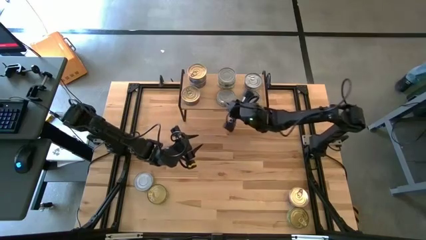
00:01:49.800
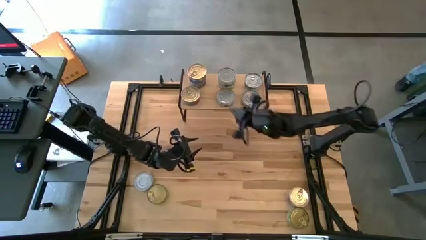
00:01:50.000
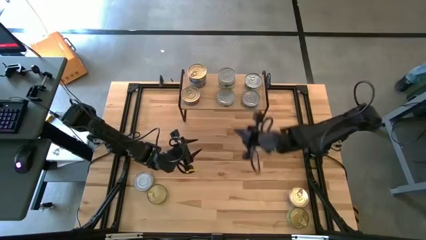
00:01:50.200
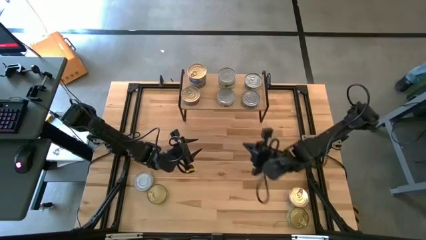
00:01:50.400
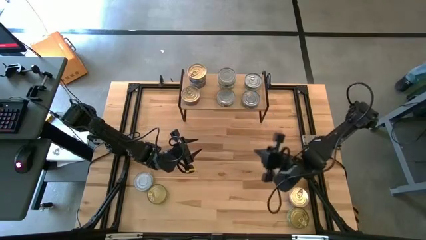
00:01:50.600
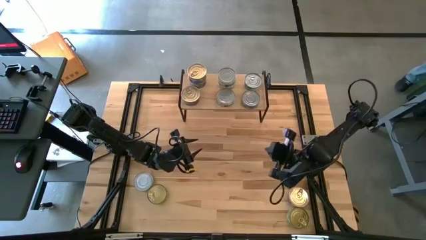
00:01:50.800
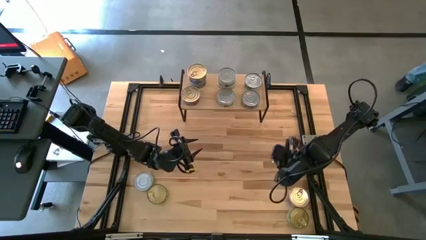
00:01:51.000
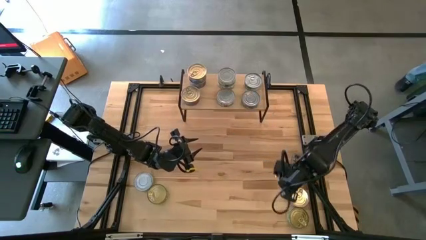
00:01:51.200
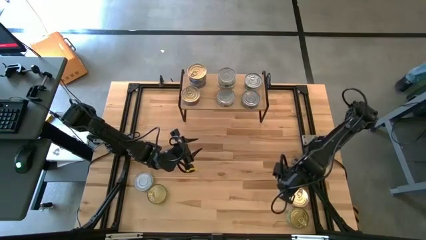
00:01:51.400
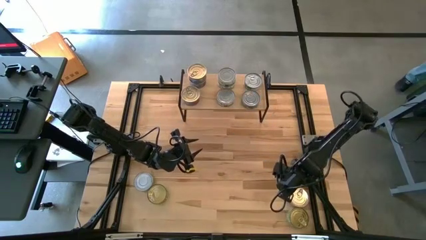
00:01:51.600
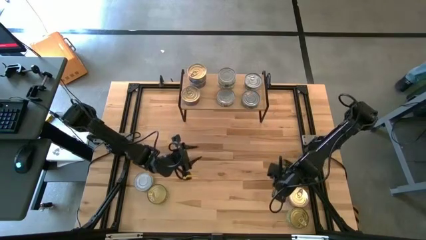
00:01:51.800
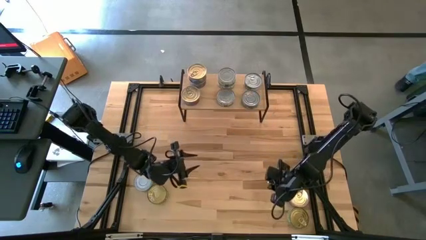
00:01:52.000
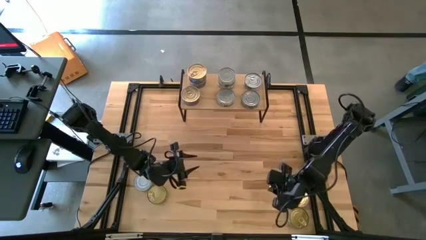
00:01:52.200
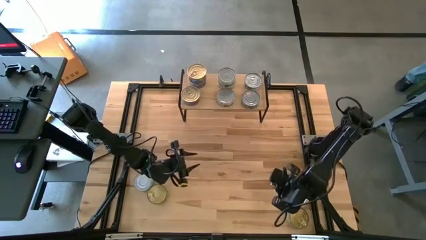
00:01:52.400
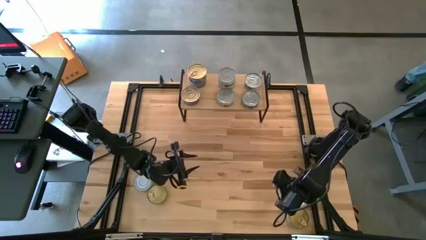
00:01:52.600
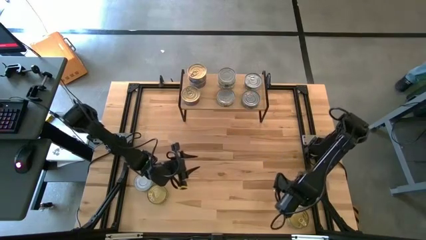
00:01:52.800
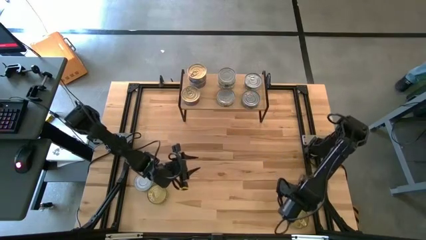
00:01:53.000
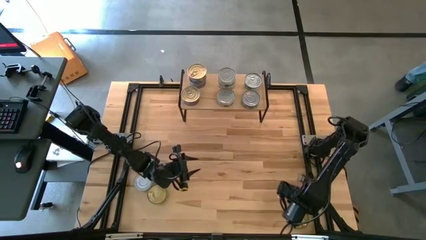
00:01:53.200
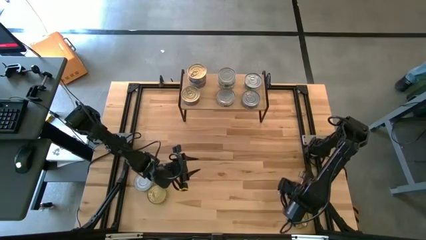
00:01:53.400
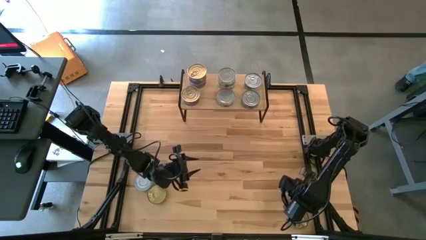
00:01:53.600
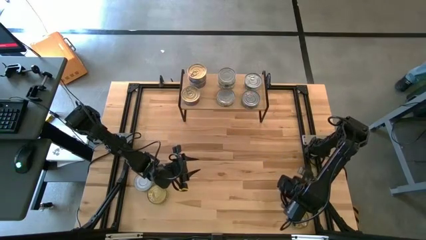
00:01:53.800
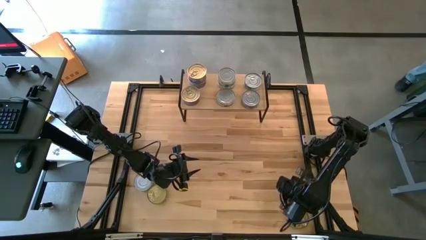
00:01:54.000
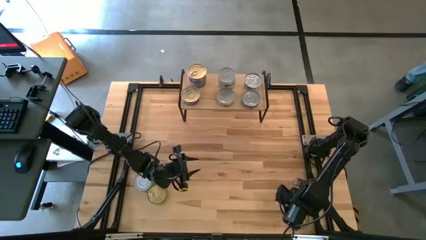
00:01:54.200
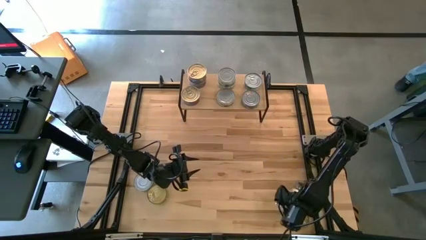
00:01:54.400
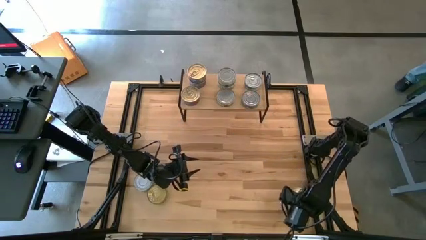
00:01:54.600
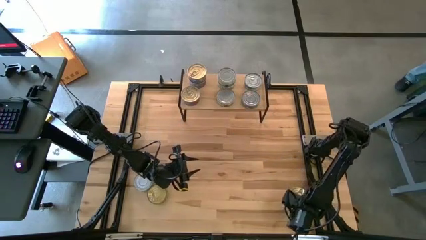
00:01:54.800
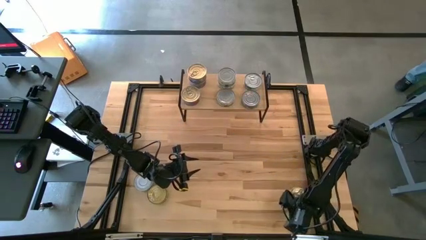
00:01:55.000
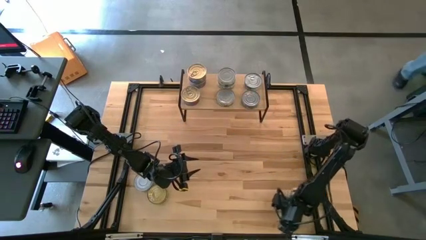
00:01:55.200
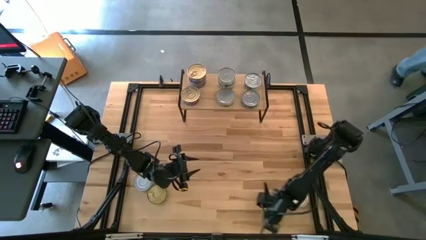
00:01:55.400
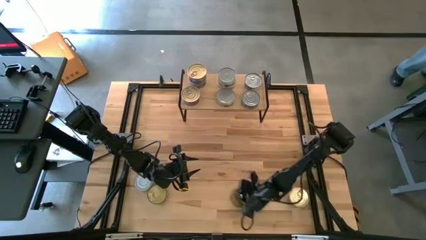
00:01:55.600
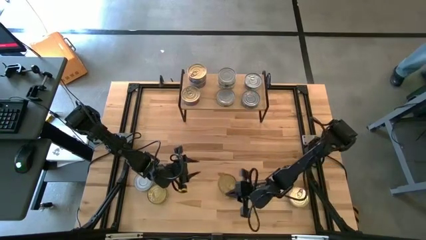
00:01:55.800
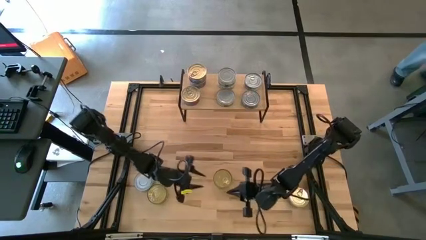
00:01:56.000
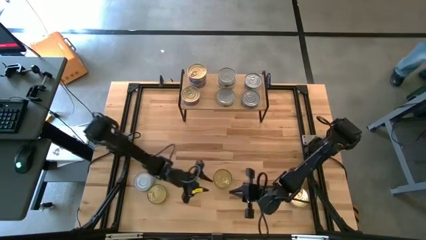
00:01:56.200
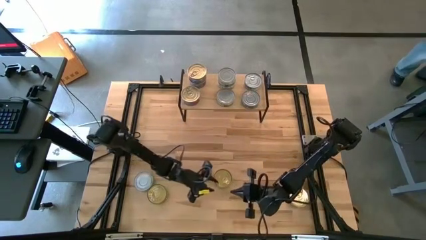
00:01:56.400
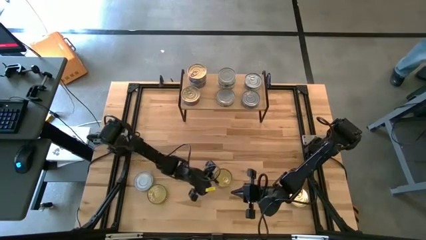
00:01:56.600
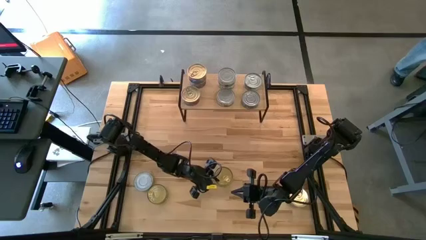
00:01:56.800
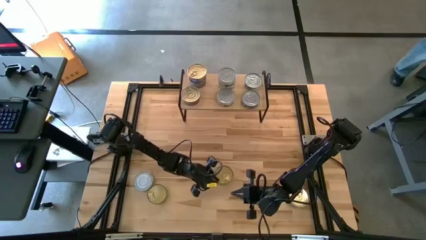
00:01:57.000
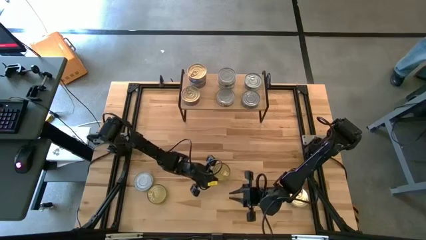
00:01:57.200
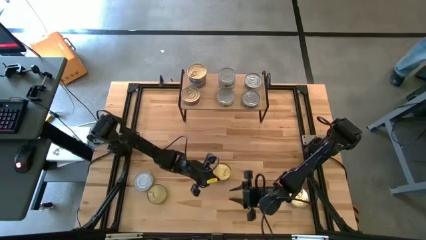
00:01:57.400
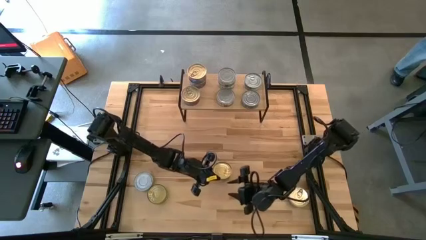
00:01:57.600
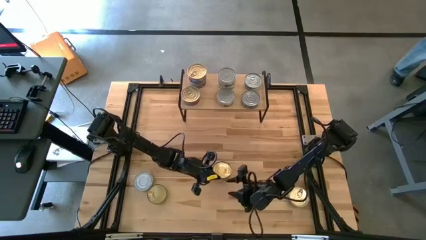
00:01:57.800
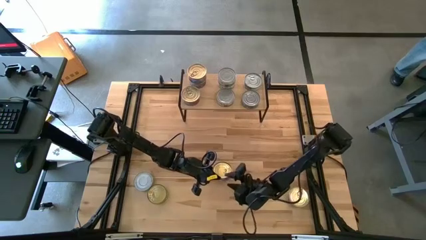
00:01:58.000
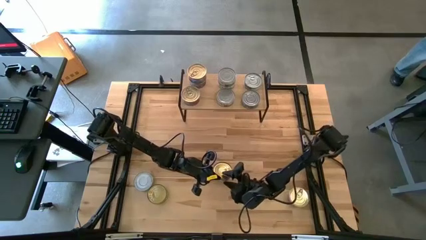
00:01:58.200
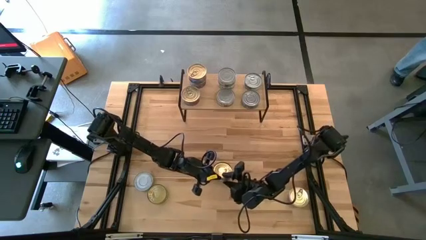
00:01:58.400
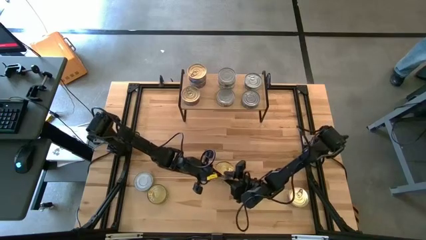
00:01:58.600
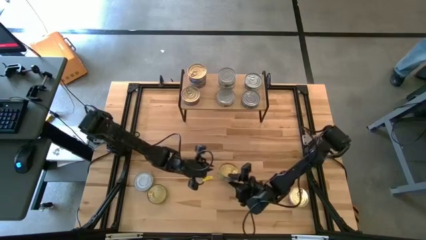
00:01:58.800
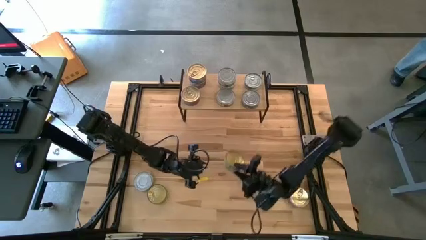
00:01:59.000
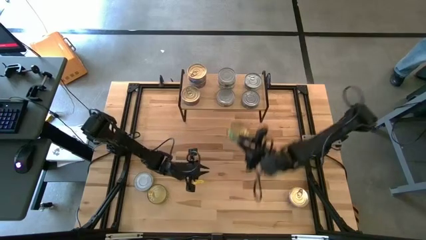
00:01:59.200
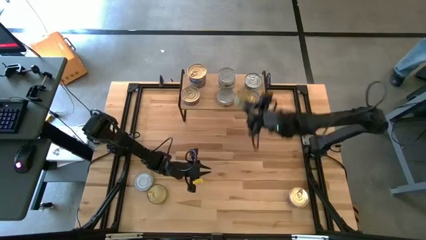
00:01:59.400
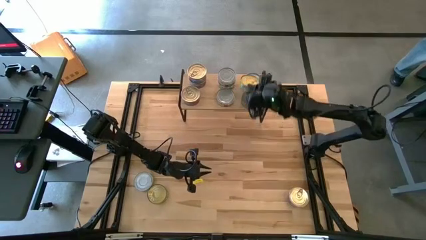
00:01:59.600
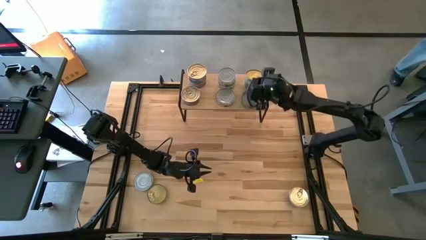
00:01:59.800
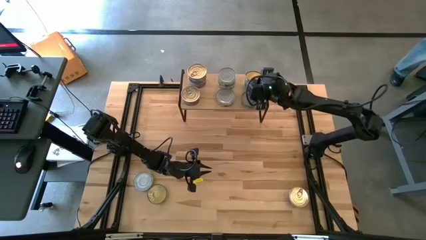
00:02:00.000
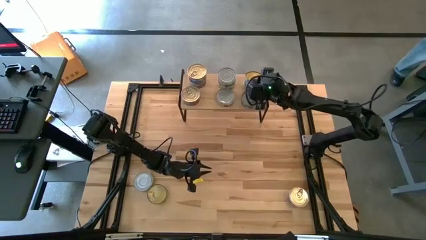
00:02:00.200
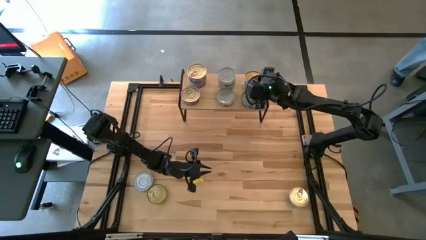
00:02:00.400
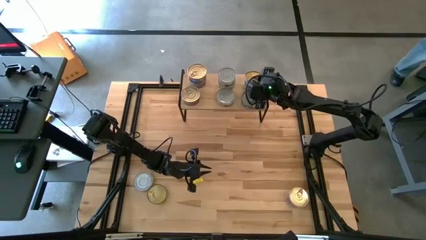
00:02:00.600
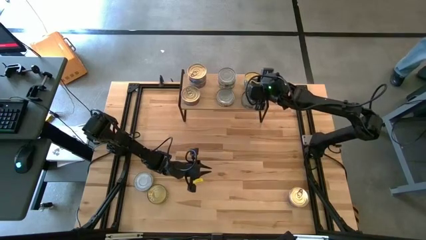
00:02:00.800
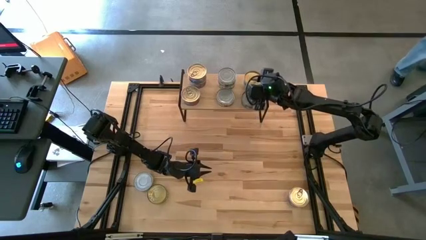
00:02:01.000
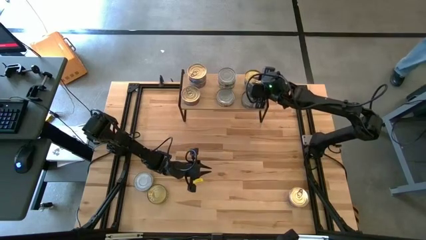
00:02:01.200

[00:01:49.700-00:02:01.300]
Task: Stack canned seafood by type on shelf
Stack the green tuna can on top of the other green tuna can on the shelf

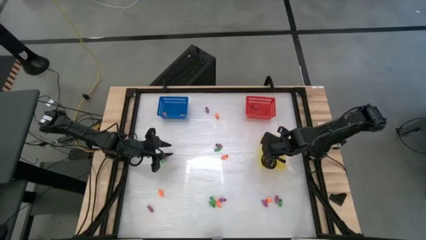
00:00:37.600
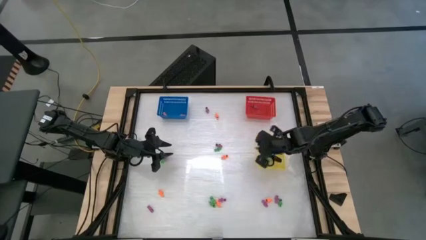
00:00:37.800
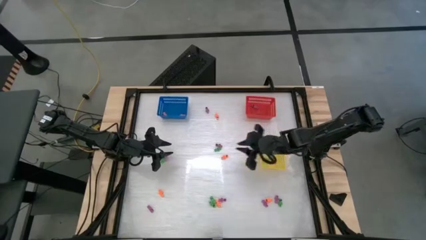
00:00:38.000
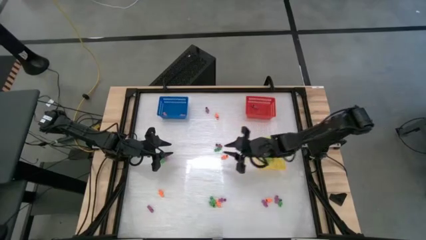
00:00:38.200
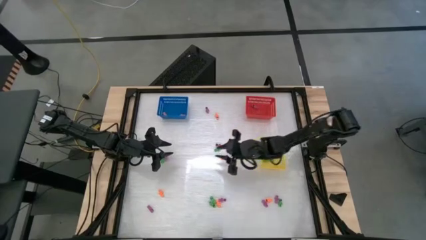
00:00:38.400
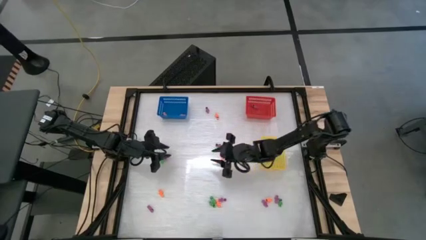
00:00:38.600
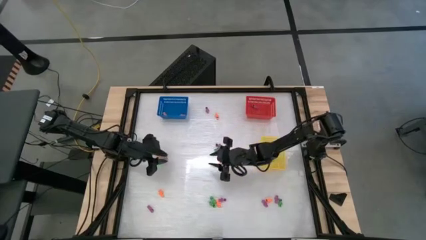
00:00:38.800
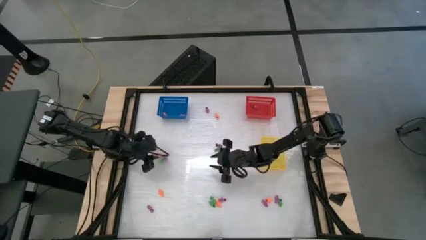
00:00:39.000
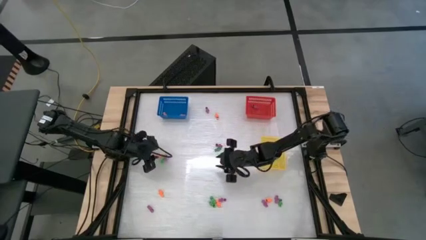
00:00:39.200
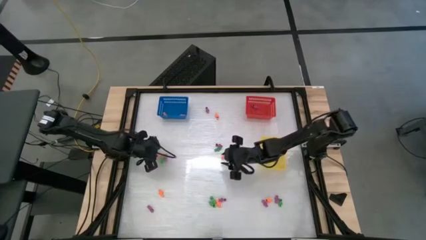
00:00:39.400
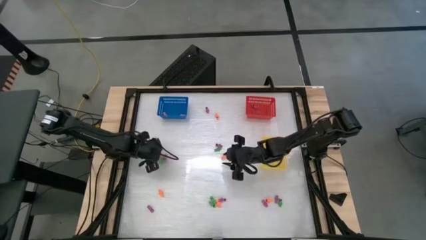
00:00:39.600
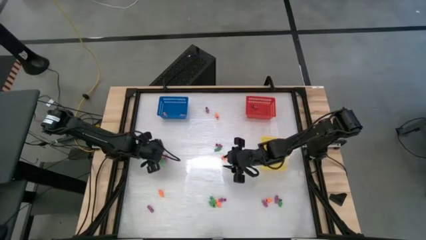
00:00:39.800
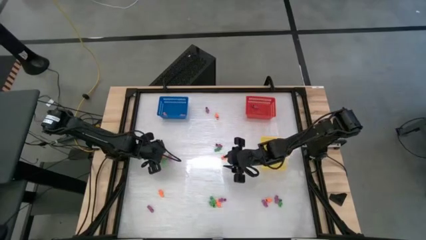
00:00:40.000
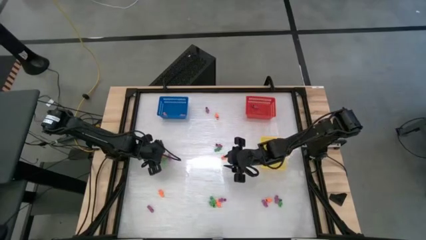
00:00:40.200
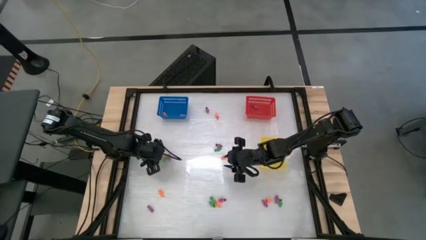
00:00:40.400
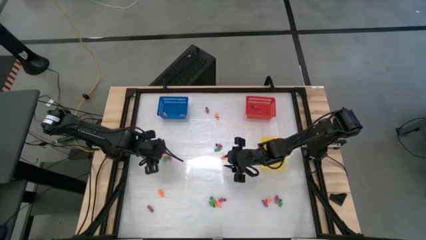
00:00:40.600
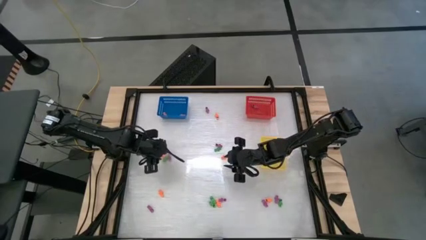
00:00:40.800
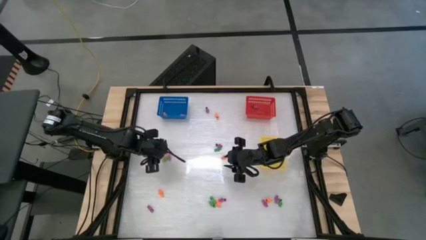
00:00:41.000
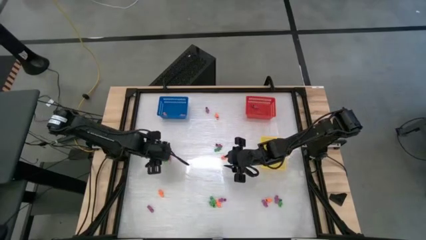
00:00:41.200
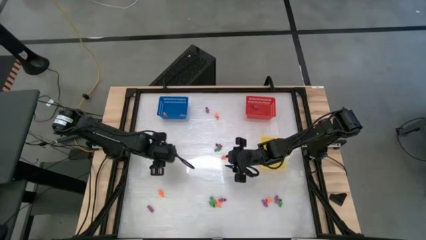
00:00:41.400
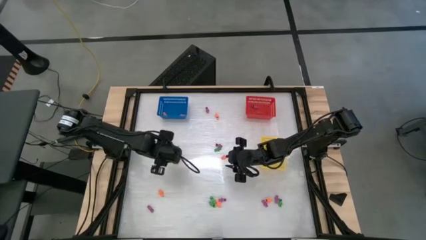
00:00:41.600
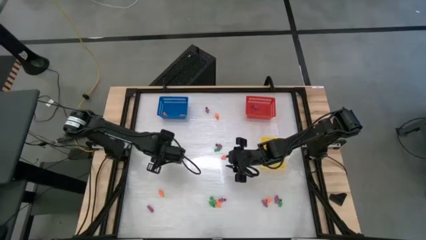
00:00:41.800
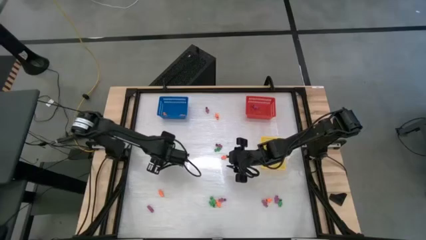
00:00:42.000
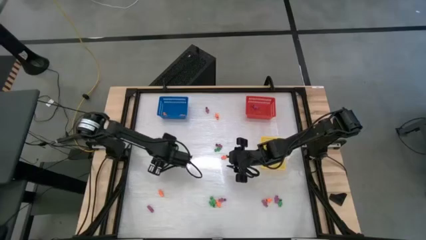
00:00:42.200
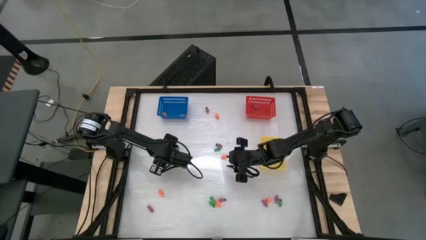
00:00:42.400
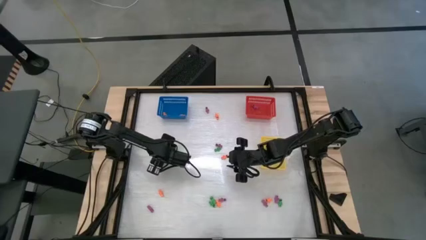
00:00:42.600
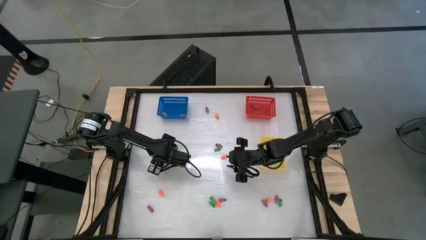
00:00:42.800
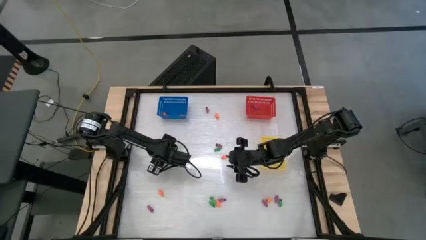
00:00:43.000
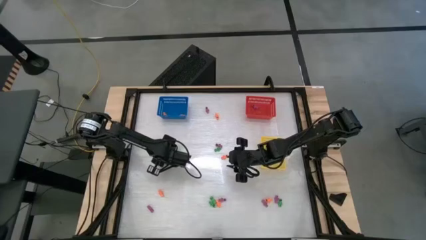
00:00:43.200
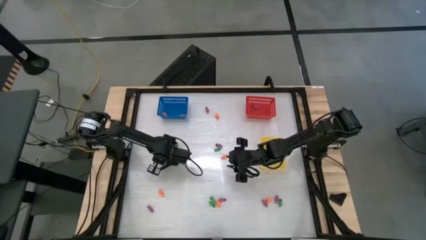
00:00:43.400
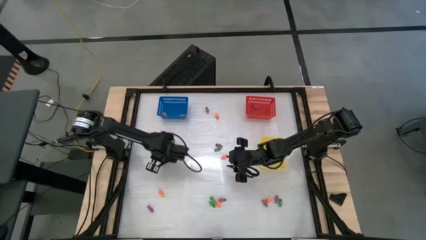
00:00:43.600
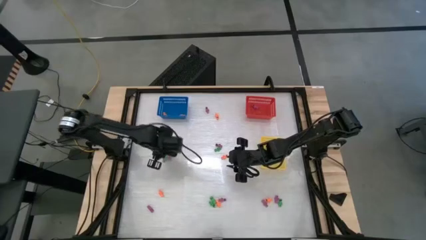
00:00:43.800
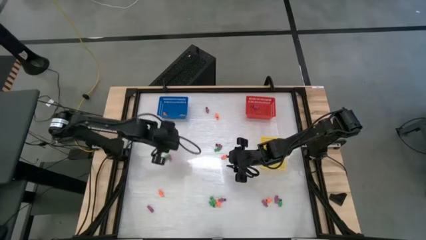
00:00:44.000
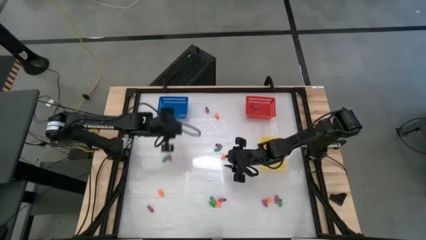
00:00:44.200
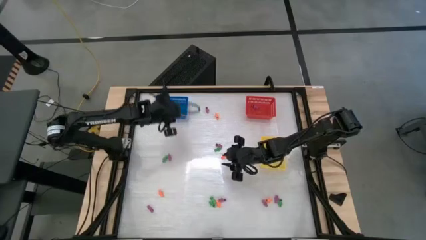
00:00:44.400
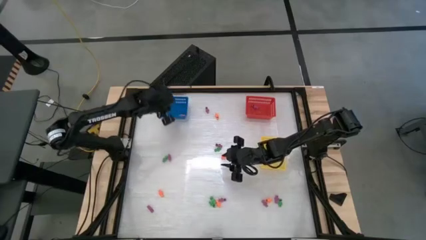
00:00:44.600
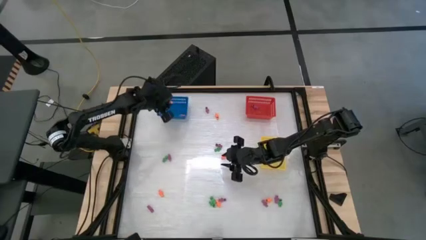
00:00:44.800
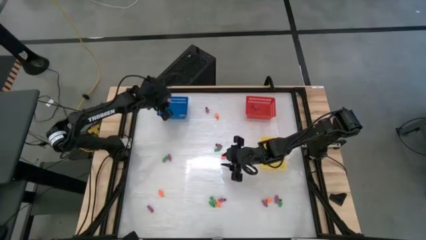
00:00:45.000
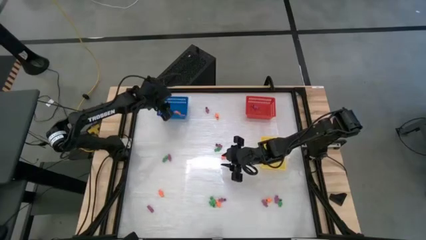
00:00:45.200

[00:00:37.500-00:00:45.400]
Task: Sort Halloween decoration
Put the orange skeleton toy into the blue bin
